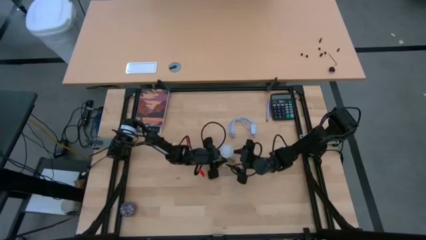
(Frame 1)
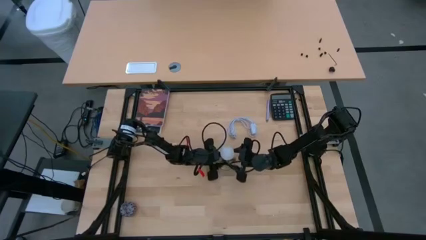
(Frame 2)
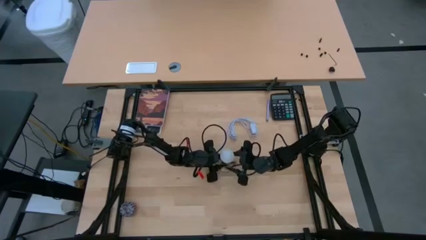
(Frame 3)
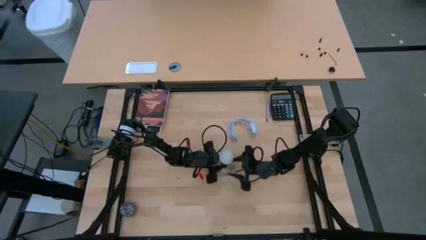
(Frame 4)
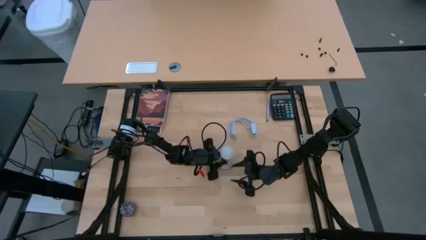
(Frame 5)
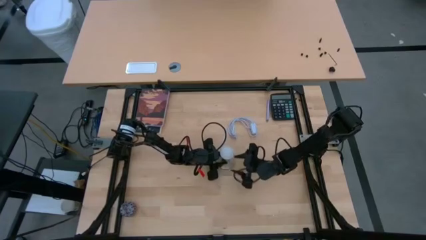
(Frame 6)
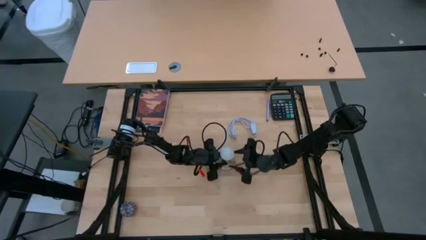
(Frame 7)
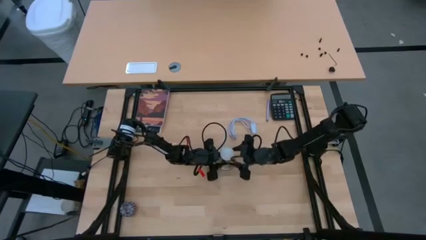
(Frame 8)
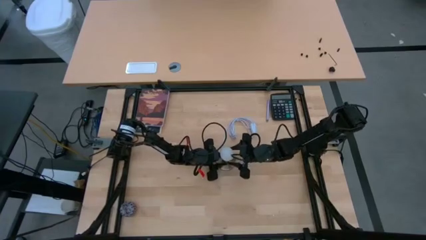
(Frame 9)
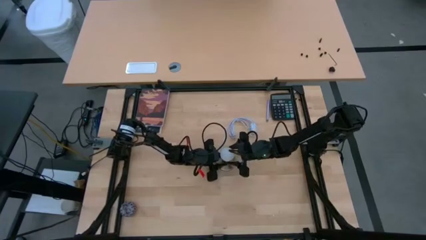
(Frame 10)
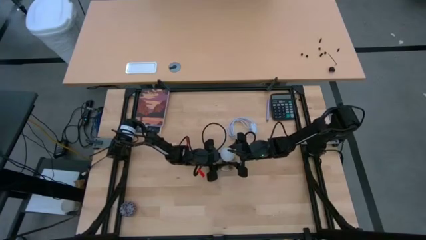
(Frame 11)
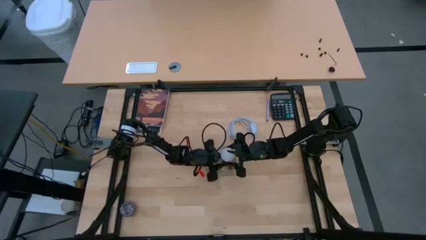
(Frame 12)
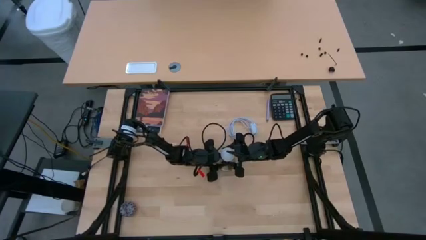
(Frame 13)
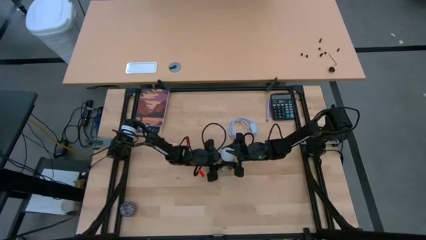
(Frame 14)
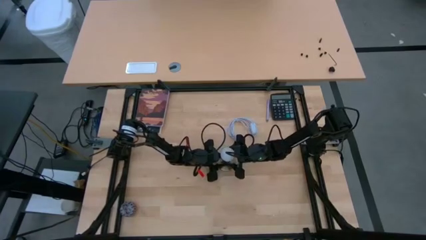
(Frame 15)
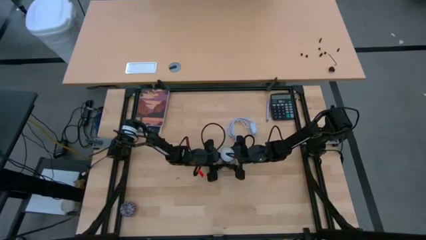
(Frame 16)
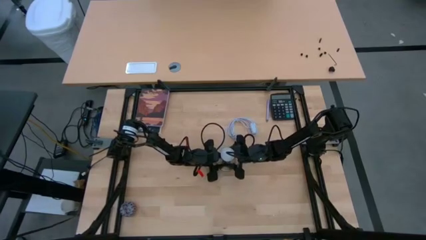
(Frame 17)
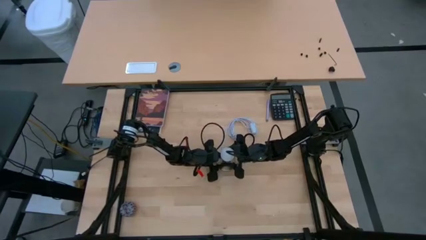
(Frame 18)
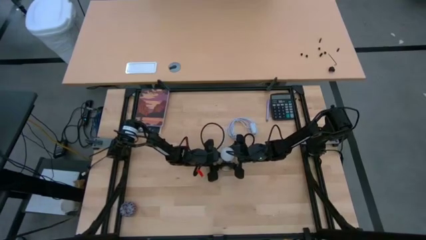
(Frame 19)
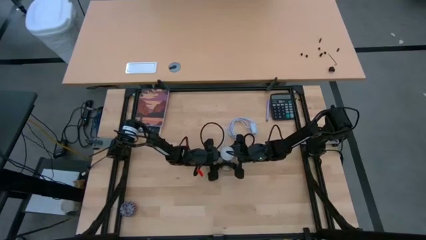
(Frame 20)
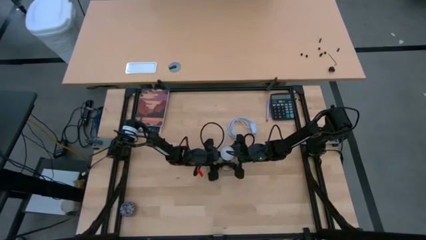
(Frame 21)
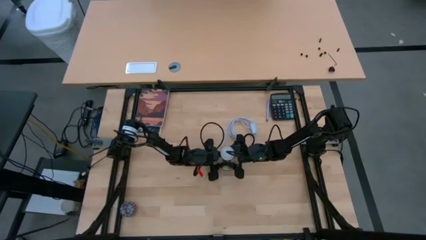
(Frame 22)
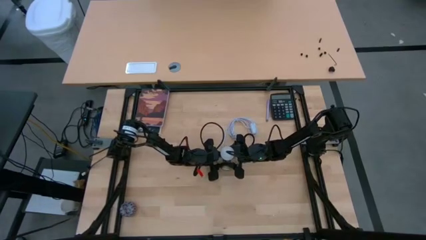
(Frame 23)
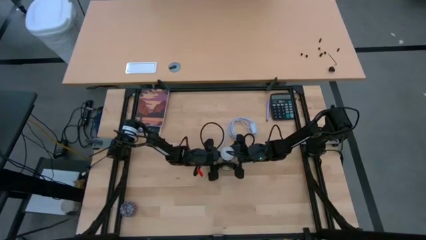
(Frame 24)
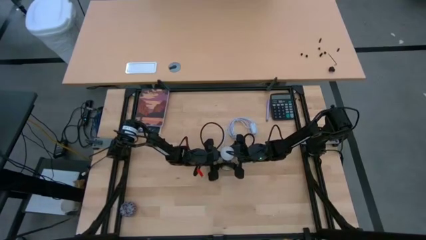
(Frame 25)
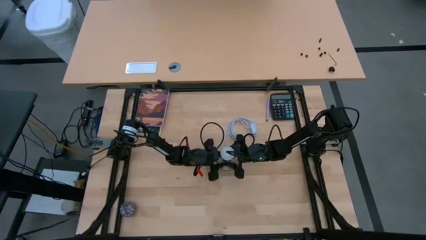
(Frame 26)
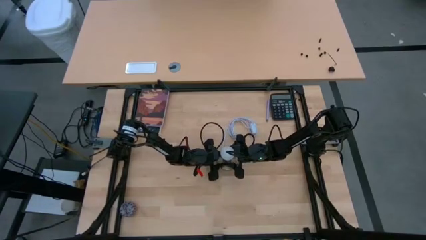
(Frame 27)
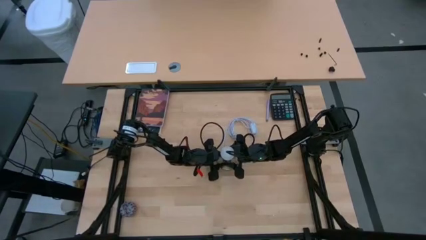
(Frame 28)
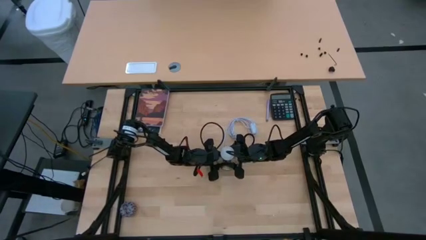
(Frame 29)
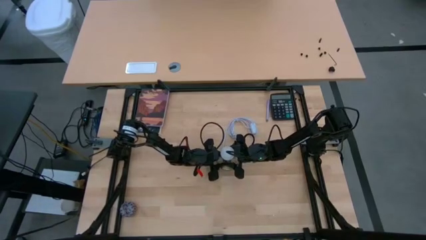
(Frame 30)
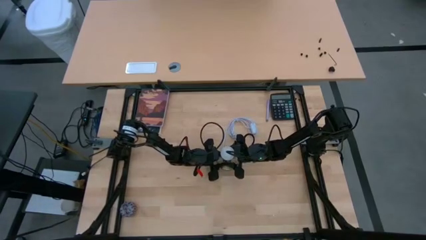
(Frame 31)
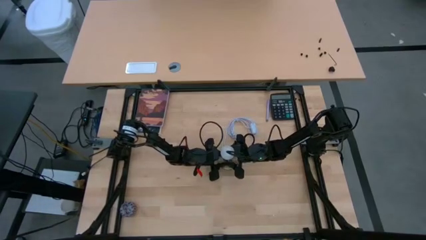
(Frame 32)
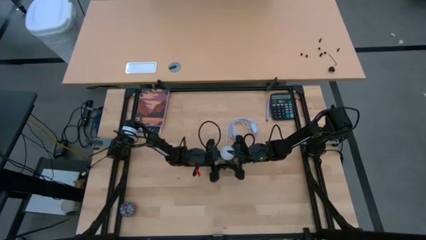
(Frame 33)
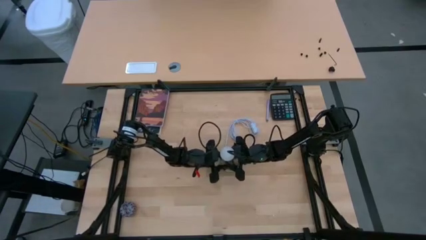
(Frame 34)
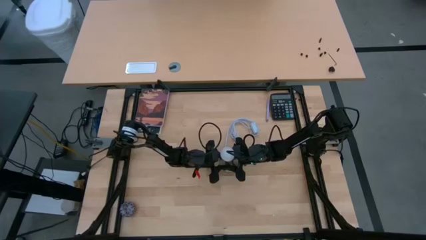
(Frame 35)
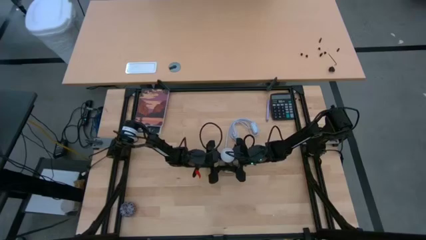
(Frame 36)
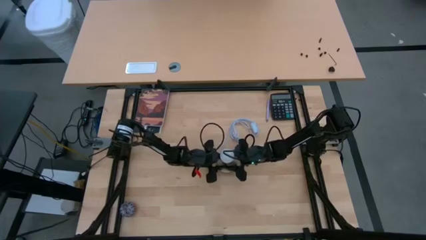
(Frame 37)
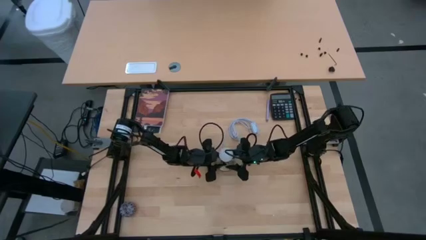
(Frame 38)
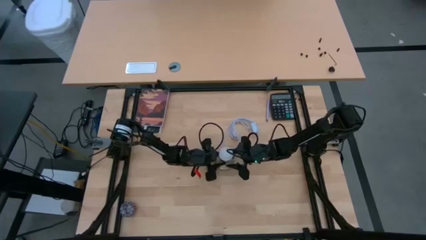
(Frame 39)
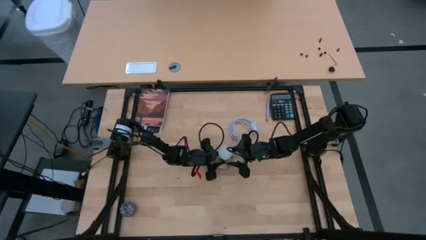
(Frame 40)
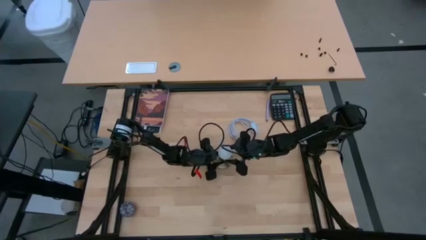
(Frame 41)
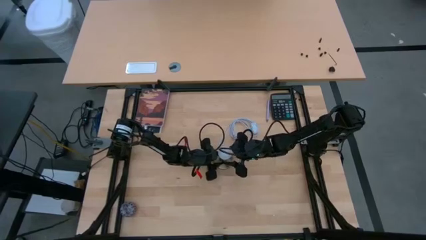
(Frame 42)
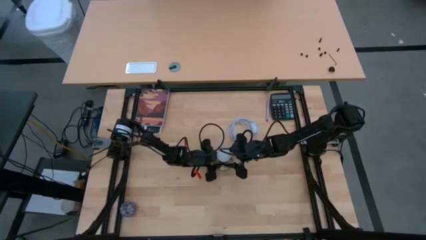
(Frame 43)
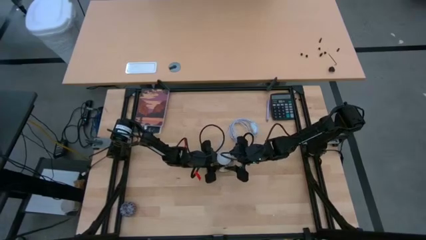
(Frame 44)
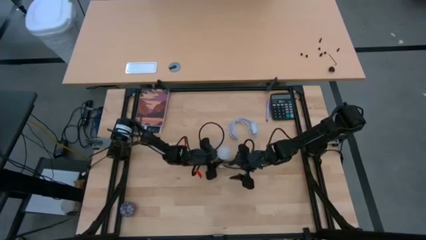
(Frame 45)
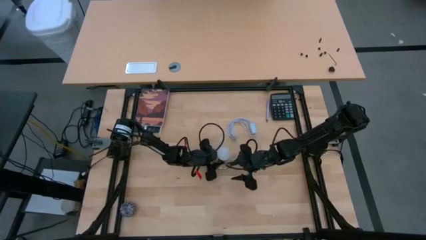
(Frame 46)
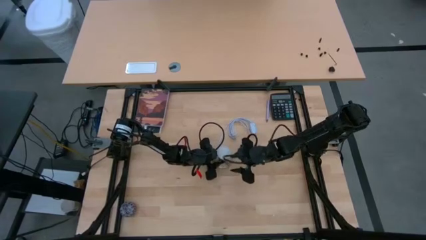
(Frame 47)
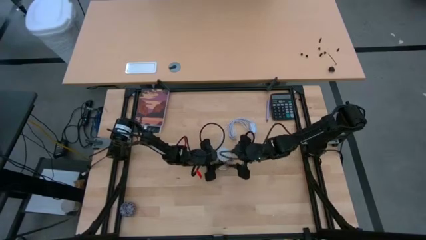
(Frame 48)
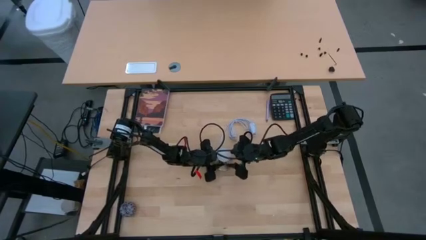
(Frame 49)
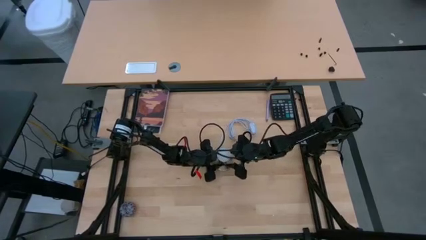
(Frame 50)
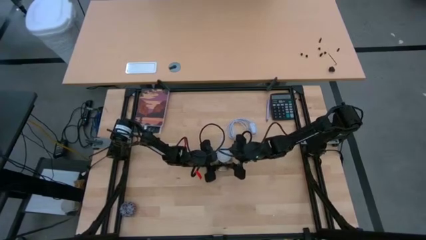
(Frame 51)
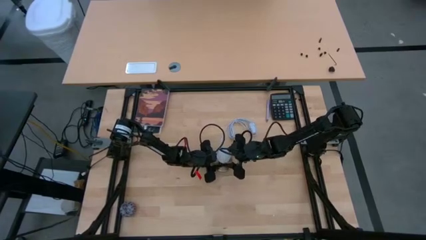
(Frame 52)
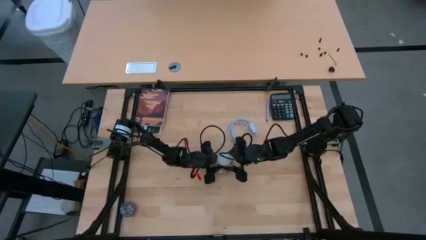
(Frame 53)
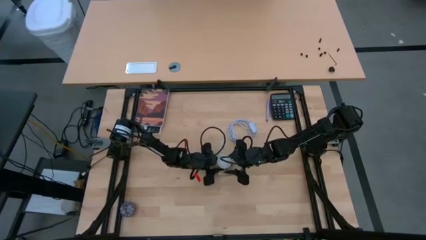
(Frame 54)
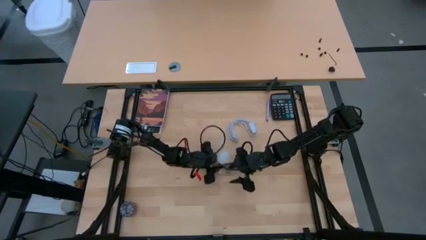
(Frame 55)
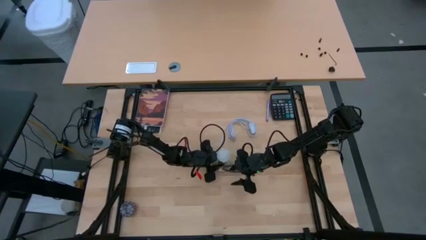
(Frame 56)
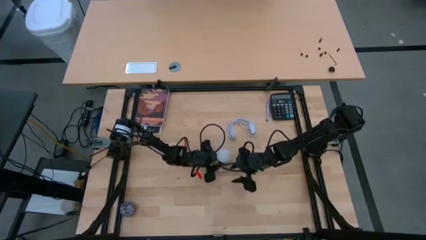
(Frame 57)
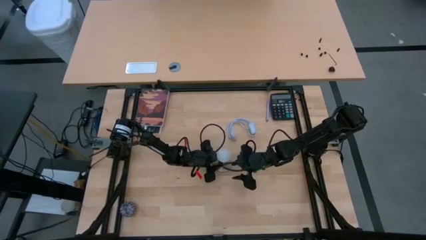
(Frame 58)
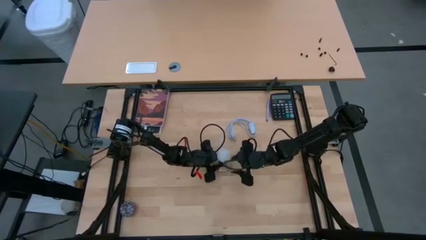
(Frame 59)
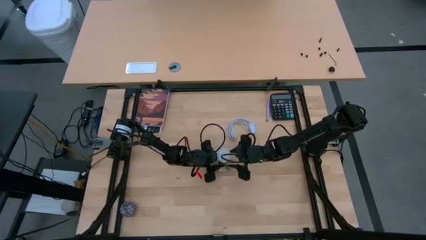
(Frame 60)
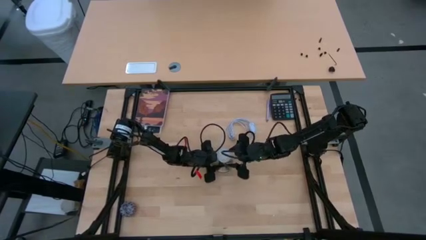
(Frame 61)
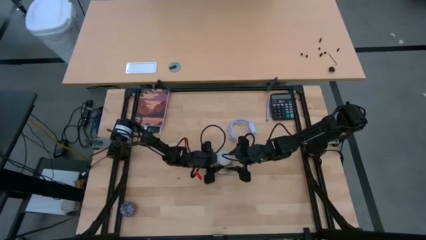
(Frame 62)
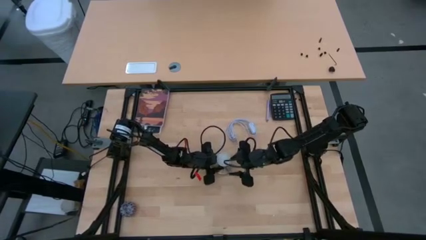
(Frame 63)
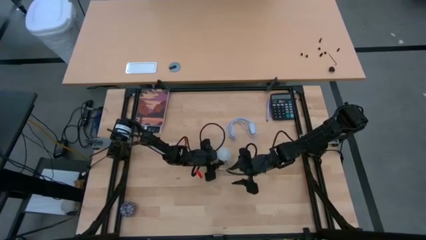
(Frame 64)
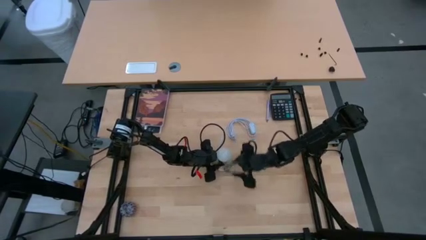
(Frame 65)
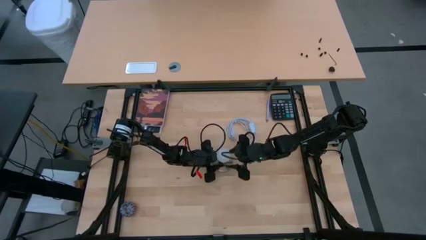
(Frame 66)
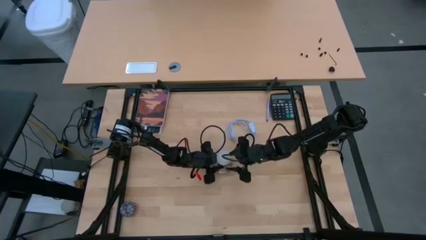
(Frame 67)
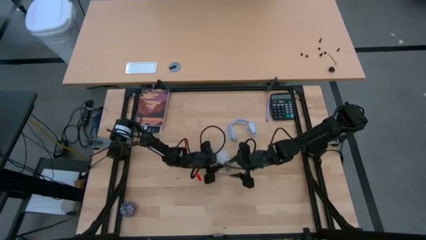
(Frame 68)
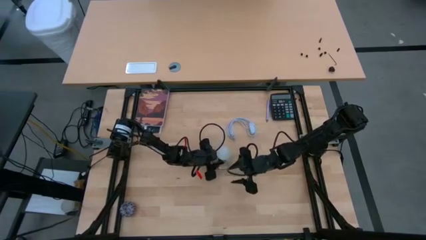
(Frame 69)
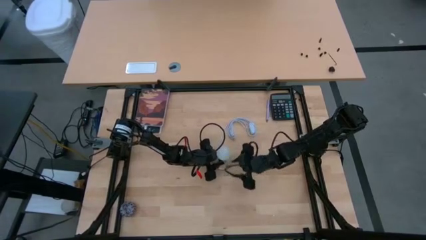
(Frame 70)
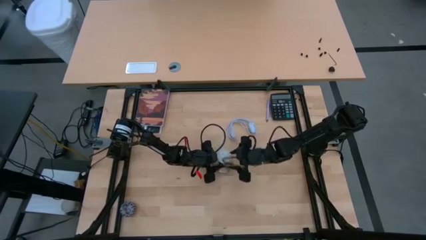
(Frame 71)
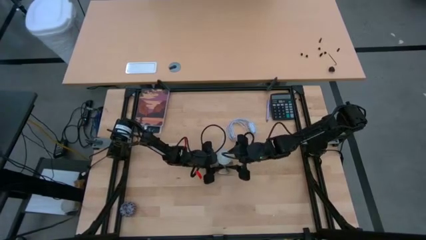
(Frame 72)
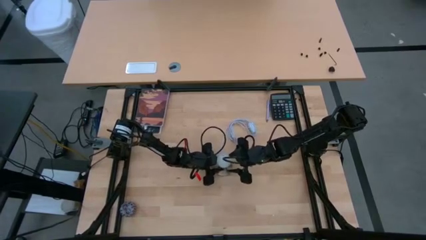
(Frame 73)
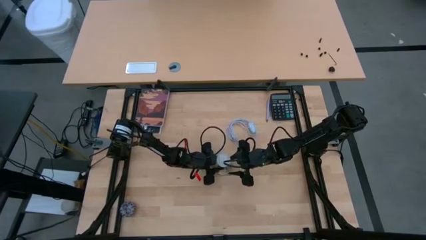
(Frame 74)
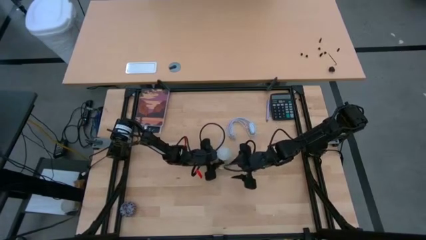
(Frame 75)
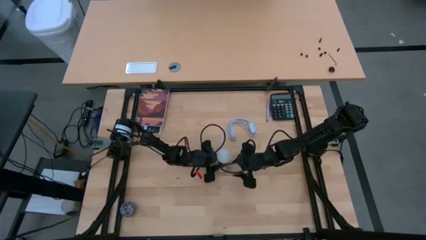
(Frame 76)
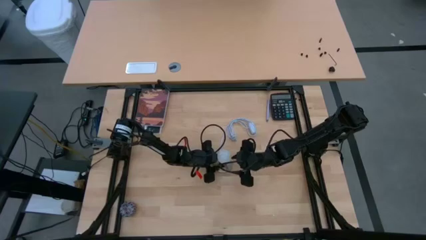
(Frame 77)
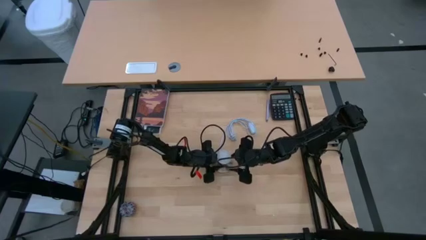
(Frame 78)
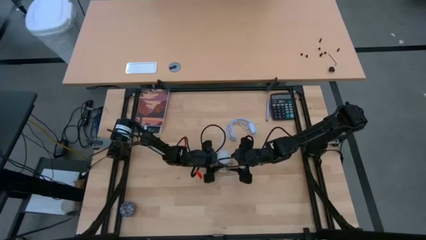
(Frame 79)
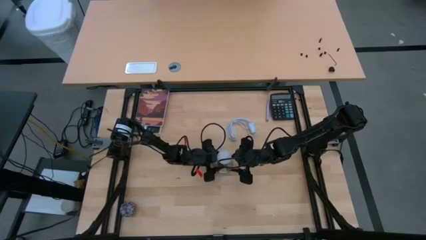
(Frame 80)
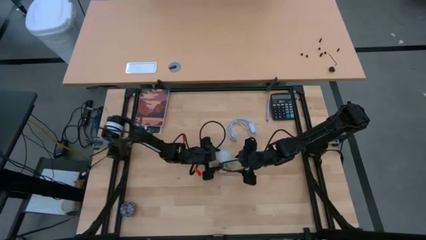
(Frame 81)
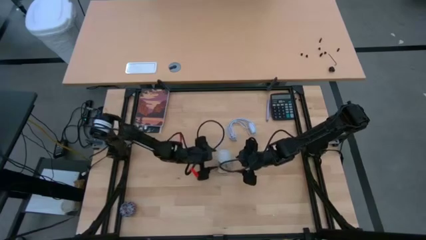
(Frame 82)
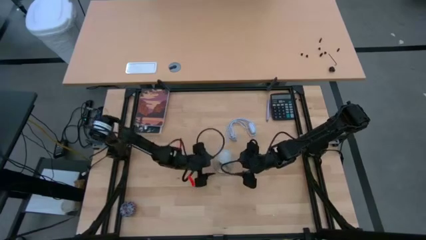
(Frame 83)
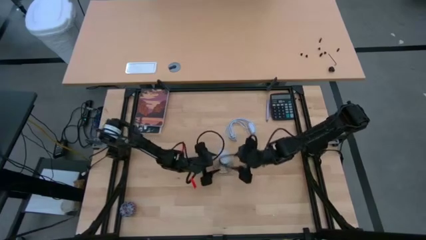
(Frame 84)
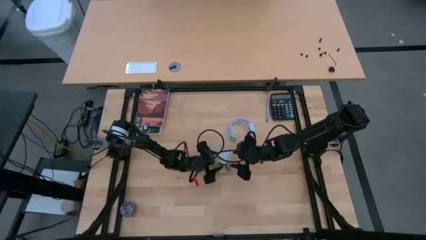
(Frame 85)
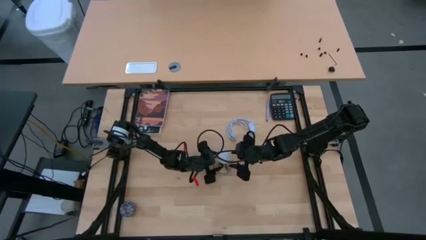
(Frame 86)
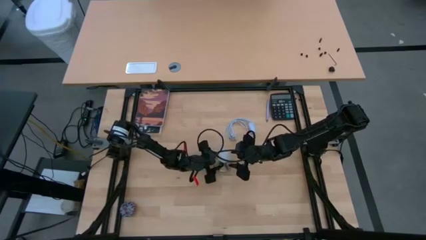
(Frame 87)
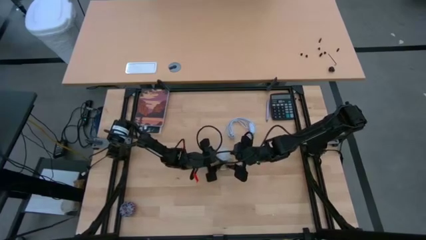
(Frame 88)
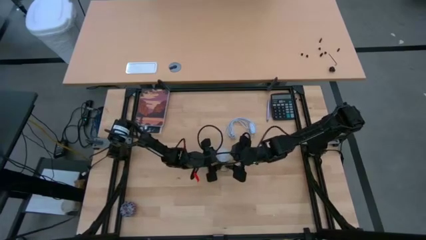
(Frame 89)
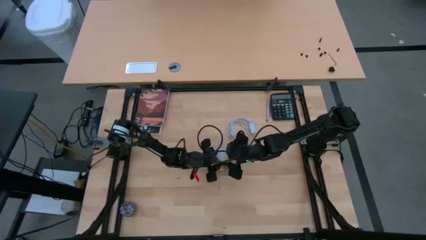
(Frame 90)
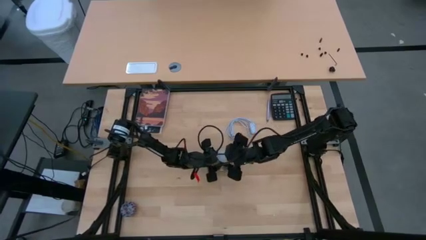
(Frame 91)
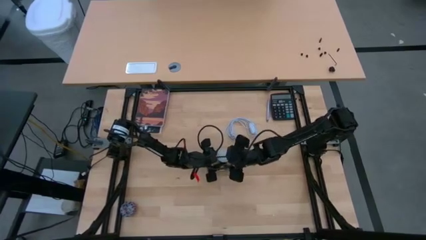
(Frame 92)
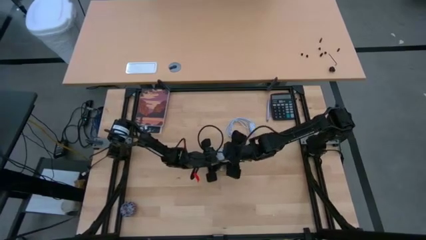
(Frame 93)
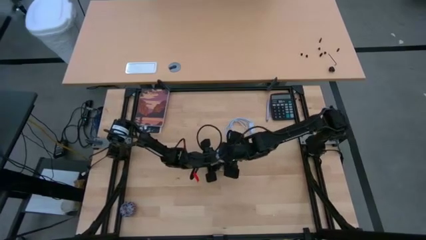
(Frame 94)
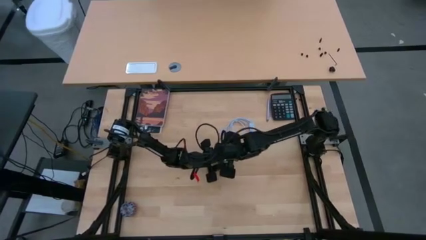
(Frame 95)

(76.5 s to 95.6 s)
Task: Screw lightbulb
Insert the lightbulb into the lamp
